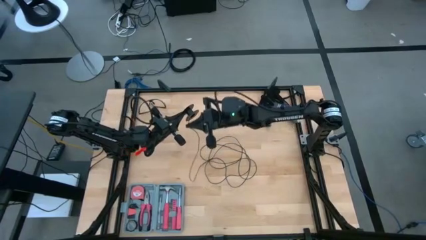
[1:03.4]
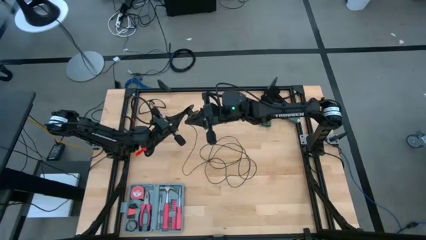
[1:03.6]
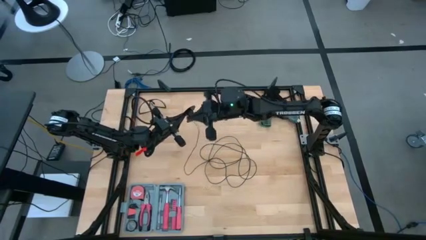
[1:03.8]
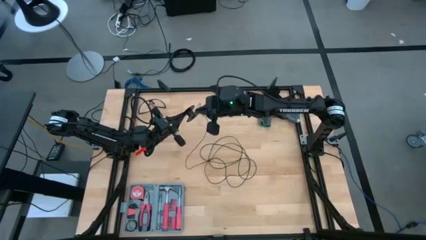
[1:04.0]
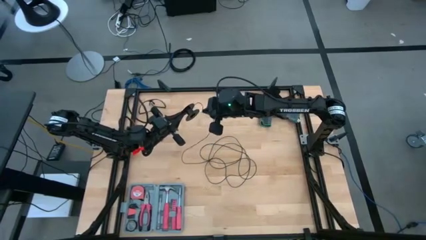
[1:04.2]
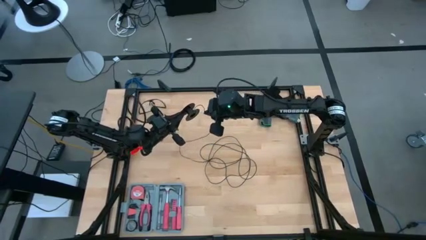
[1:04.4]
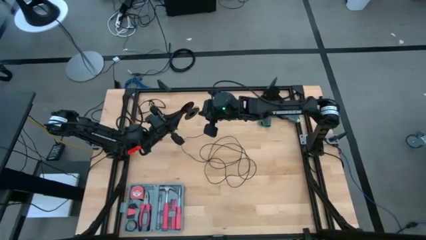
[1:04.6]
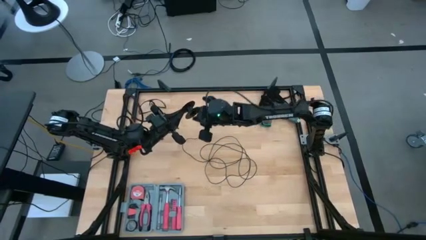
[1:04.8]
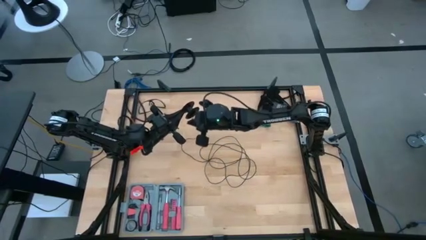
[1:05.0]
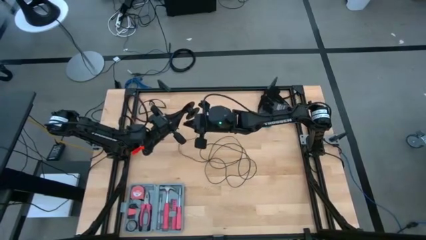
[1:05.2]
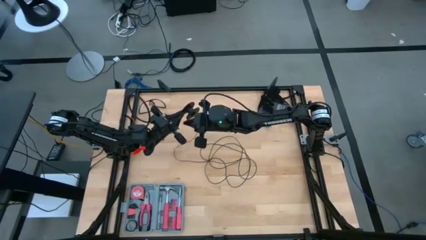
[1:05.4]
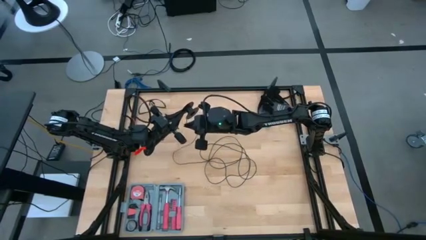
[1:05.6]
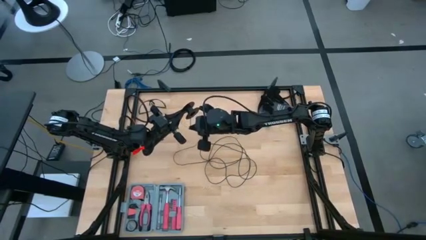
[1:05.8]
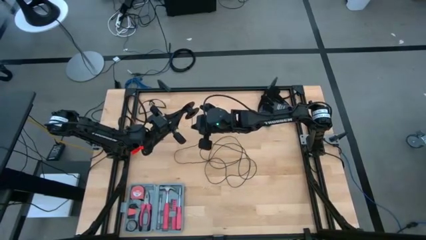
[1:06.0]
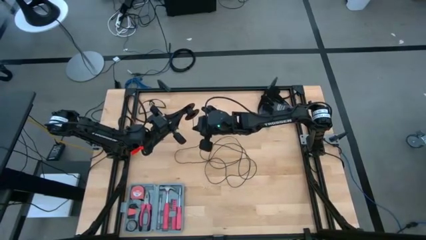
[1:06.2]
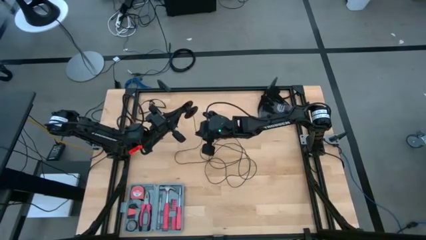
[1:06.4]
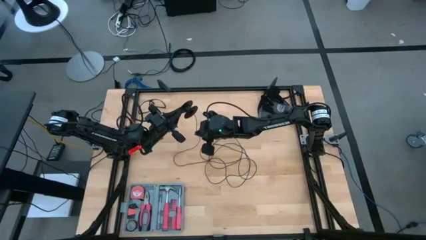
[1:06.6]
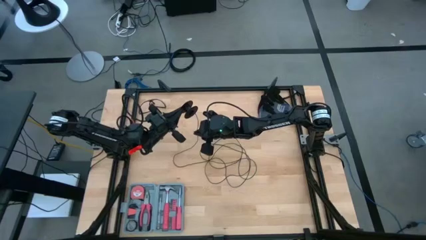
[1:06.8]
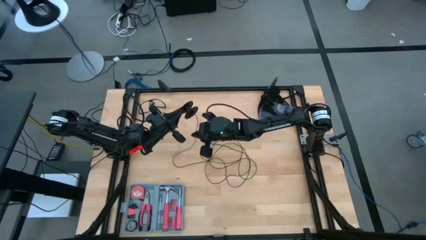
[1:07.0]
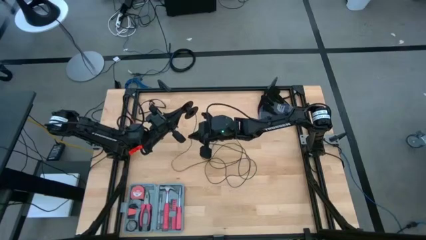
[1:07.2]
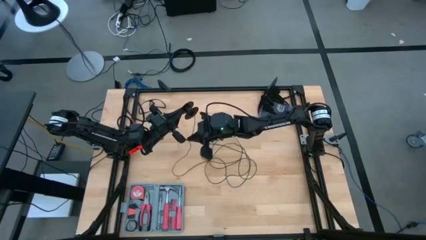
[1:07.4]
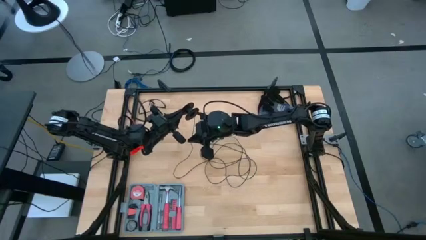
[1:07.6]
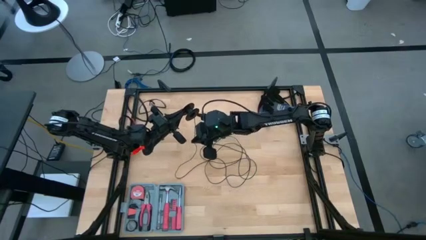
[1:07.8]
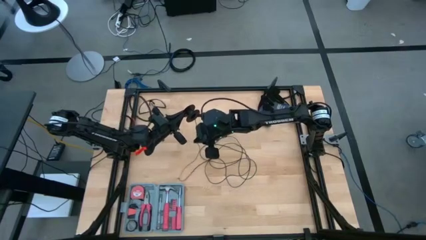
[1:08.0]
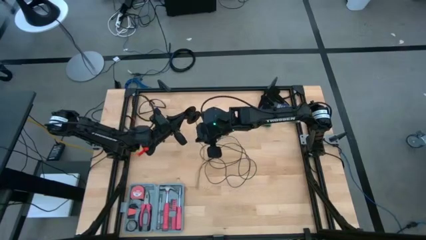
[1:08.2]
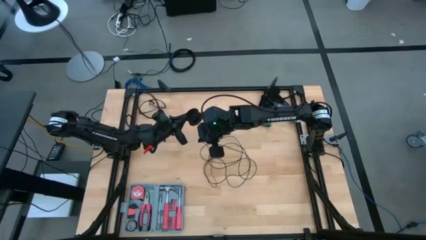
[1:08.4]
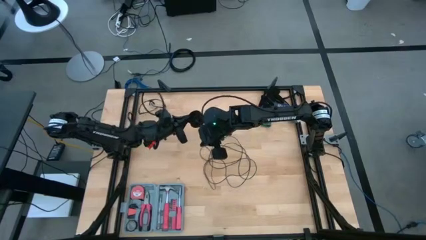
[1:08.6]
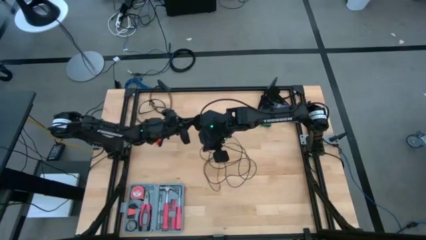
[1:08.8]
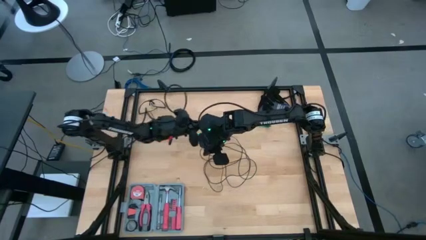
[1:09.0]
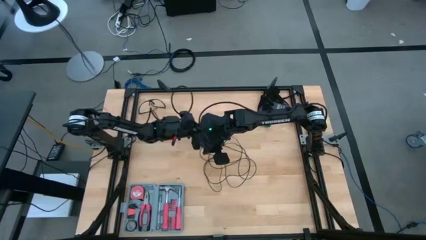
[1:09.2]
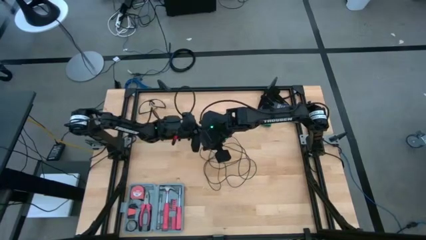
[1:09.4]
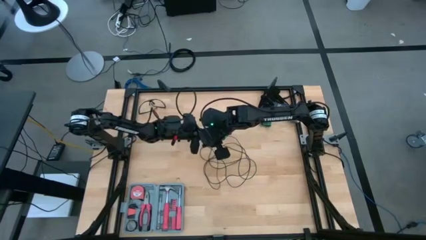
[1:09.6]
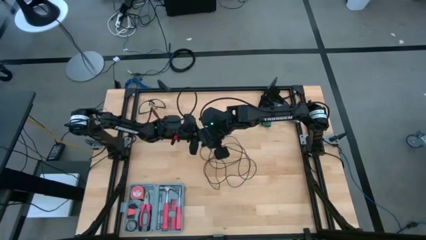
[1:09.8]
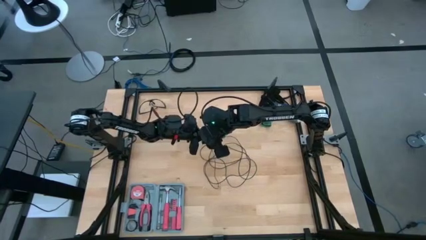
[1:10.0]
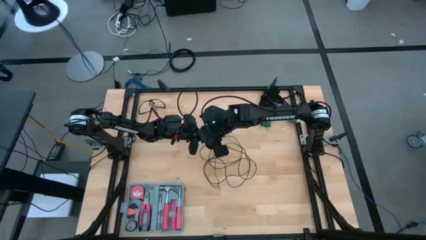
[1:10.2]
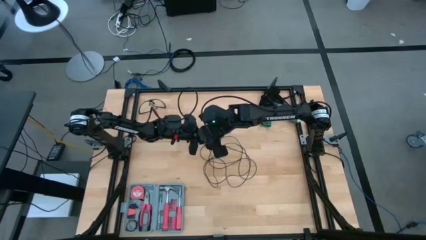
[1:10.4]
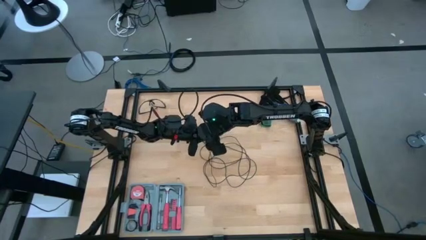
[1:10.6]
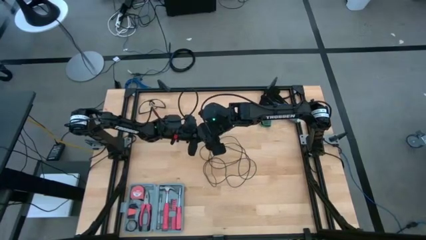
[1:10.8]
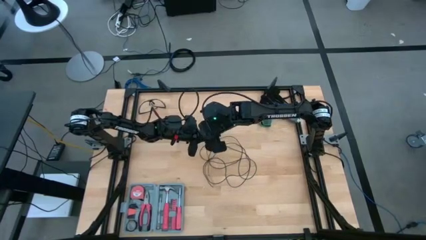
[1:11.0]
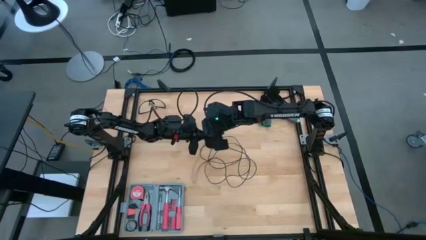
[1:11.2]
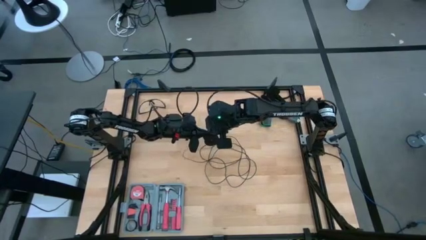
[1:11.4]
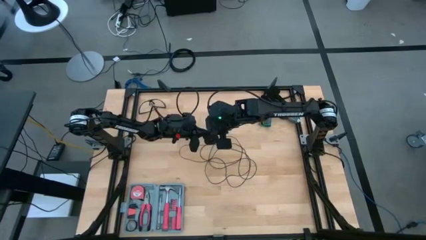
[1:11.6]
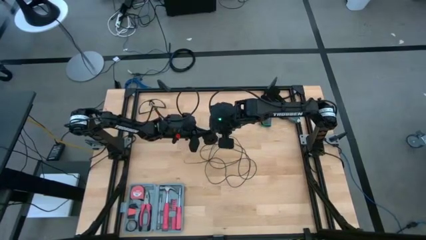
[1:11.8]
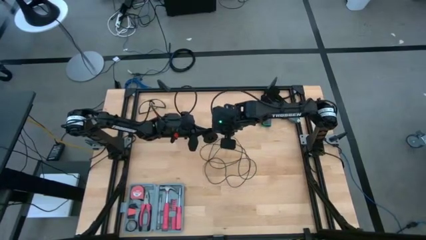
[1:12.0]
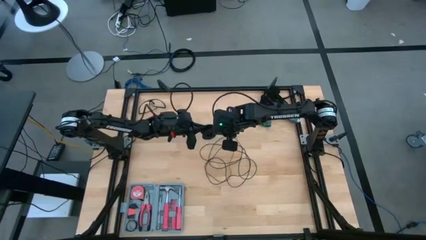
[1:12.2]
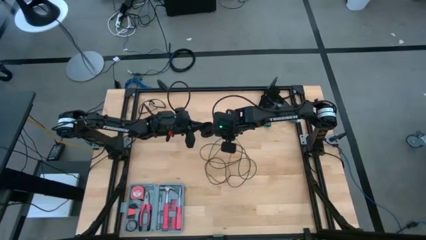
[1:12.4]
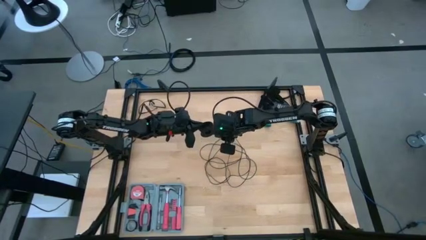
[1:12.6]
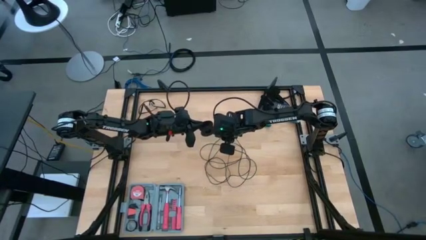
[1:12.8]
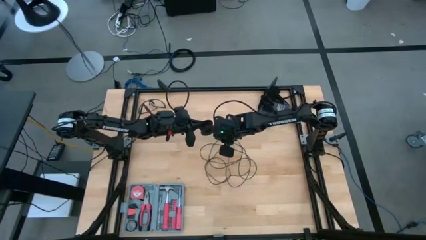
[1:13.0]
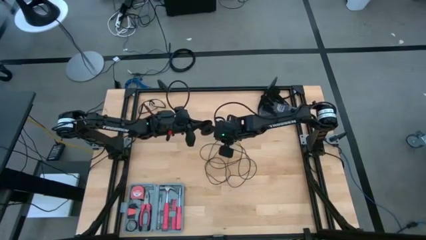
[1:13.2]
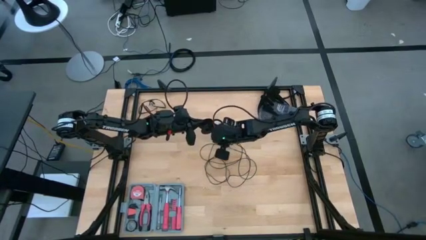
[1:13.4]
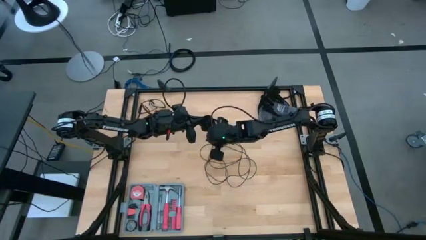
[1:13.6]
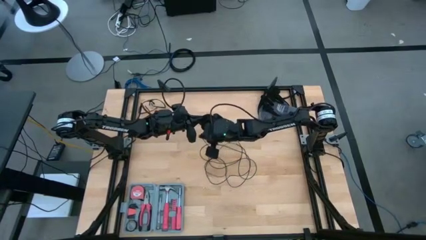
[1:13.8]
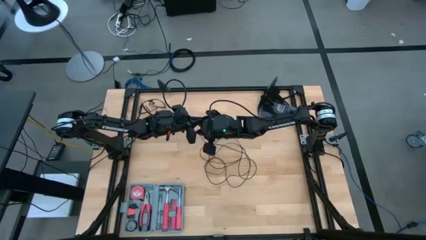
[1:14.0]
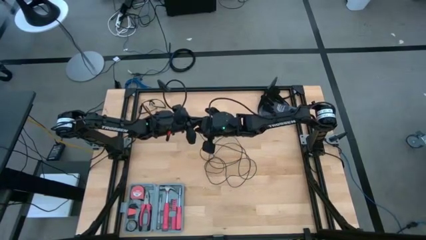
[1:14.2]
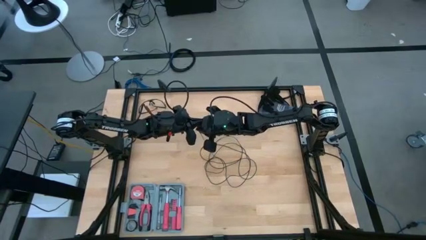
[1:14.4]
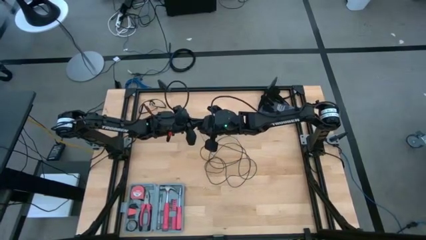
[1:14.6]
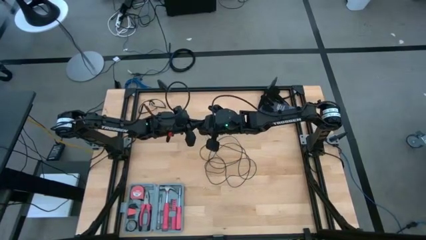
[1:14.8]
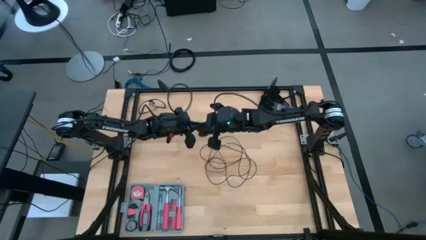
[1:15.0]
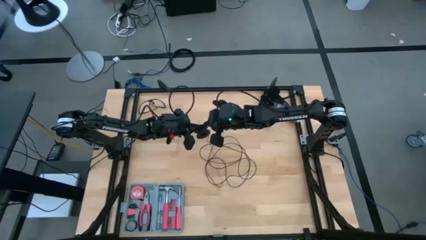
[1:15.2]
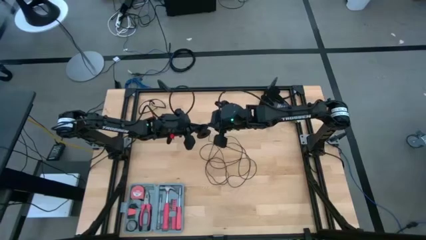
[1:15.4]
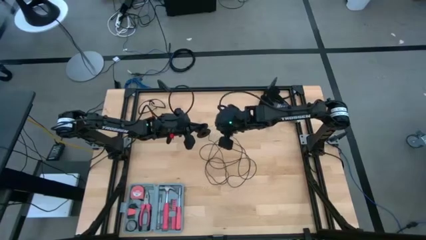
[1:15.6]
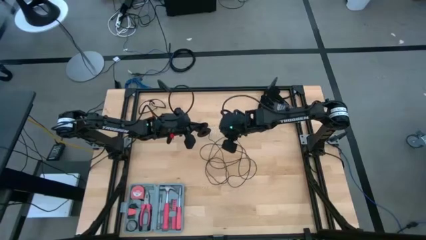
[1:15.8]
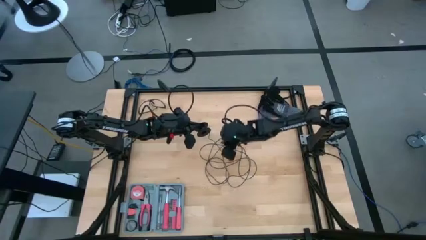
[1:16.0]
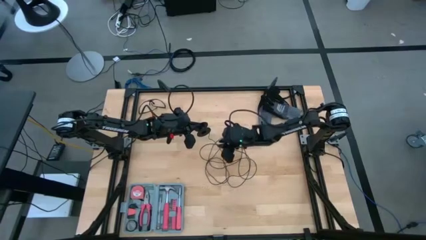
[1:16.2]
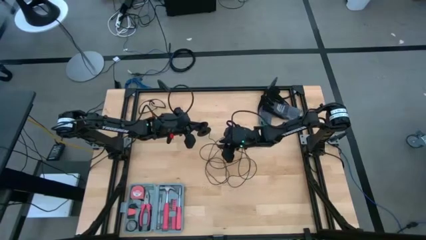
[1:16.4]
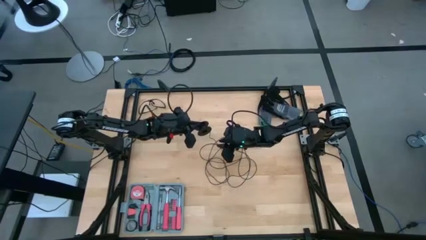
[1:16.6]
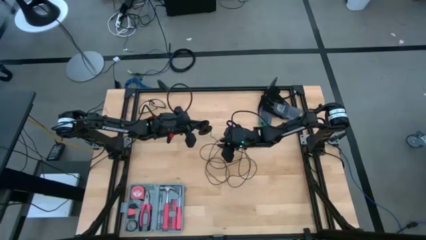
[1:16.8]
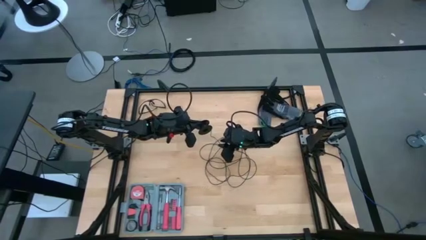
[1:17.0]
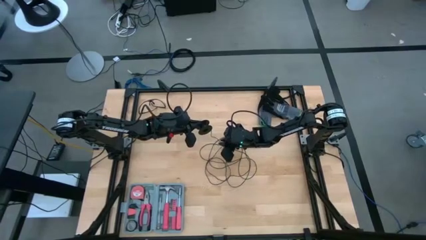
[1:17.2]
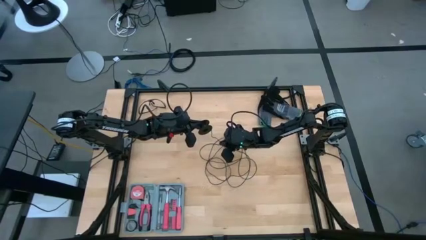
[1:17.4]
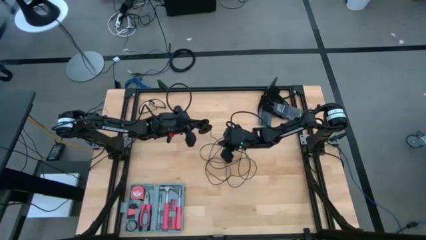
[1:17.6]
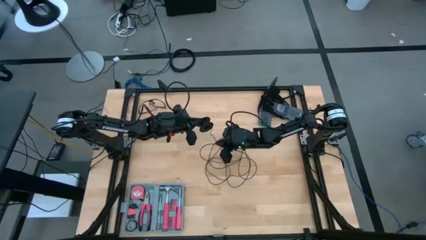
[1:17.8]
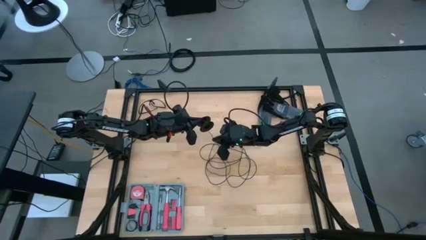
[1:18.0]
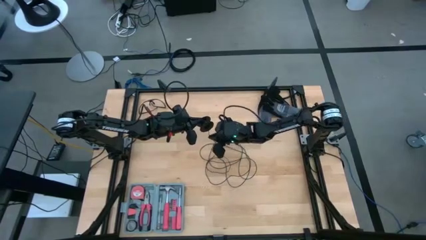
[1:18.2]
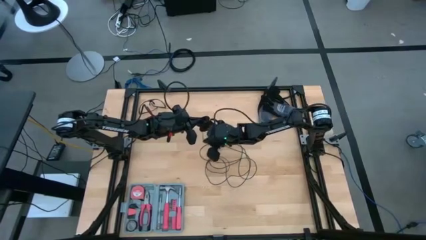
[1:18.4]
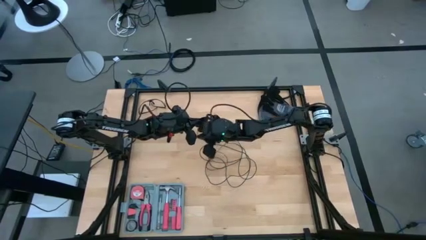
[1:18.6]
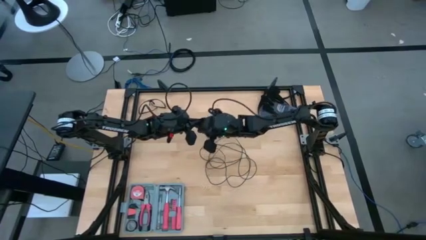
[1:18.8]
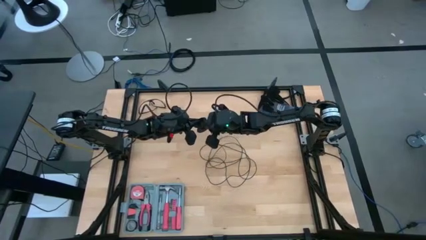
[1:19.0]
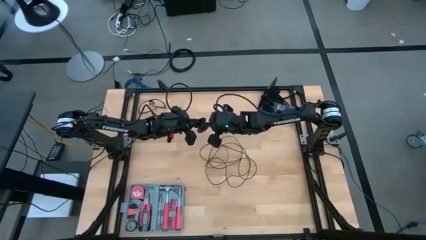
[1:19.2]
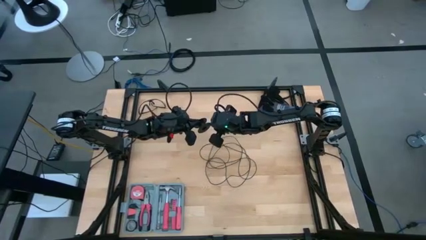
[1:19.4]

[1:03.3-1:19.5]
Task: Coil cords
Coil the black wire onto the black spool
